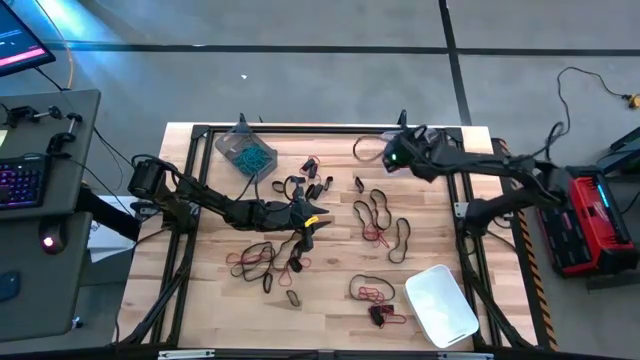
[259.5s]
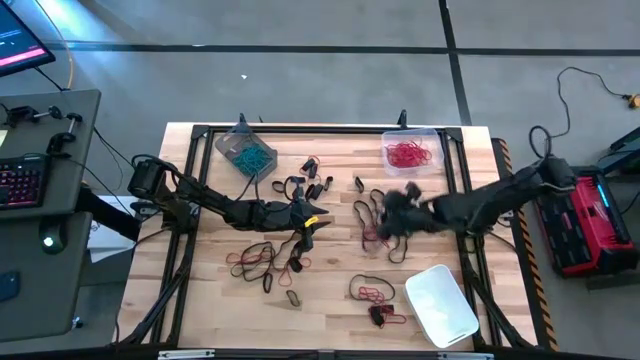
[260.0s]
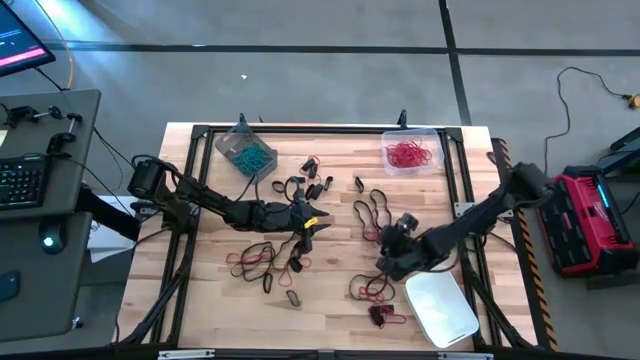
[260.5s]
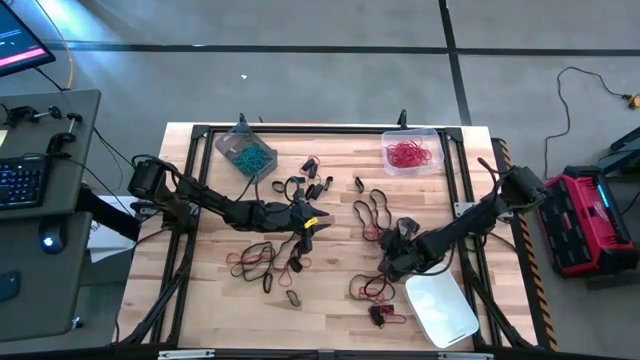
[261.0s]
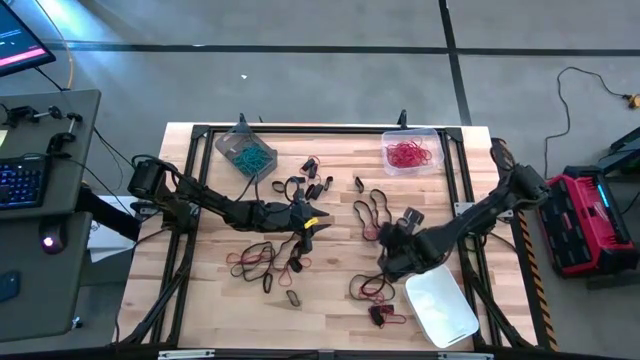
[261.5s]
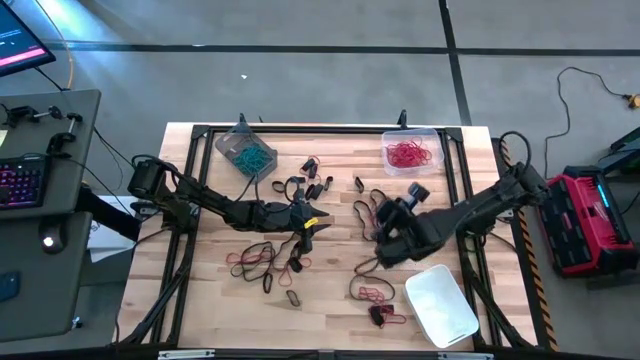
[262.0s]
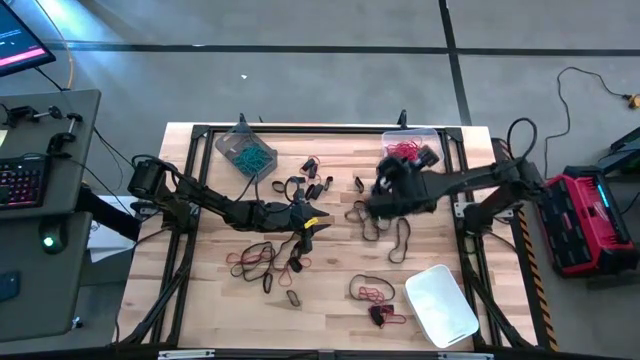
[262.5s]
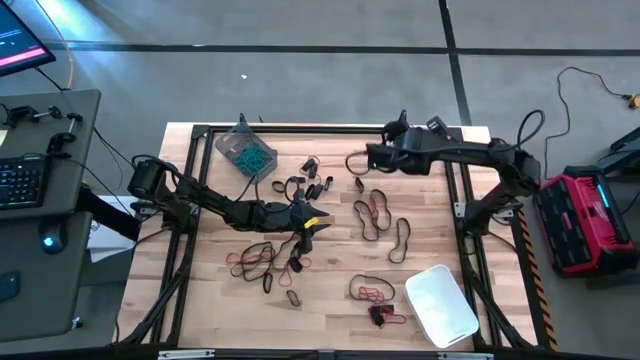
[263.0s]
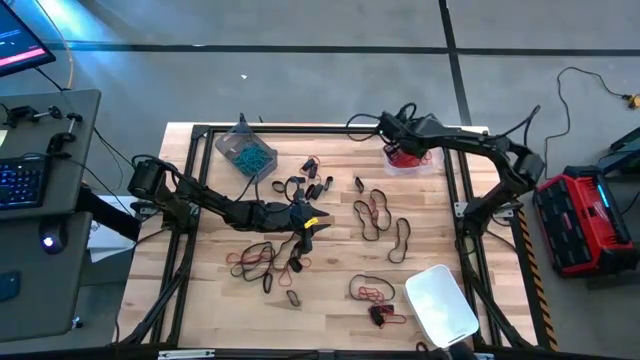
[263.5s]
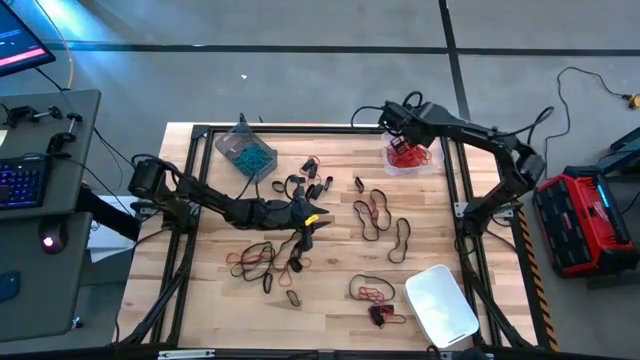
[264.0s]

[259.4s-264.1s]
Task: Sort rubber bands into baskets
Put the red rubber band into the transparent bin

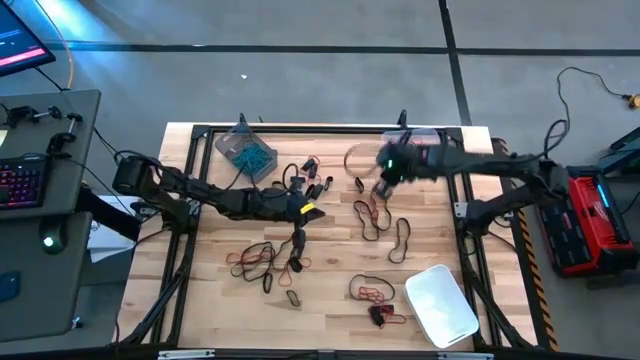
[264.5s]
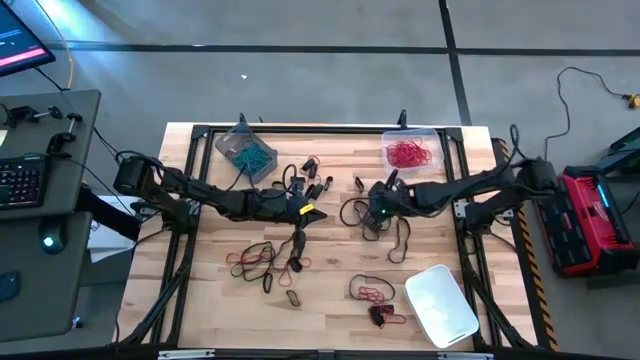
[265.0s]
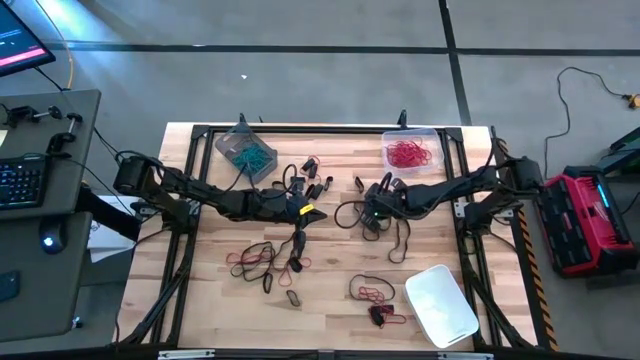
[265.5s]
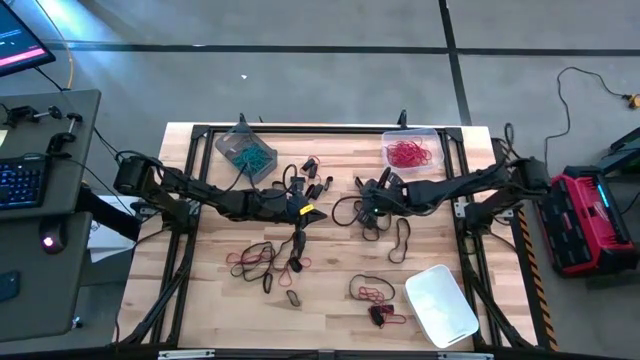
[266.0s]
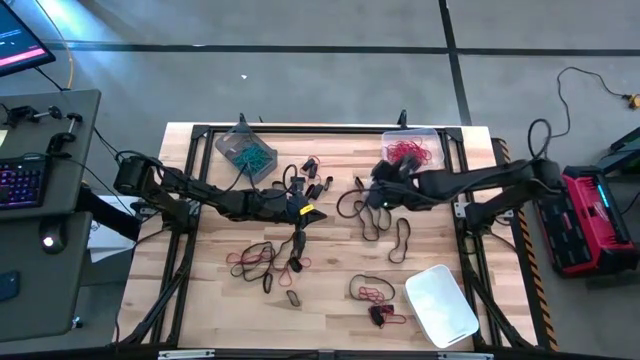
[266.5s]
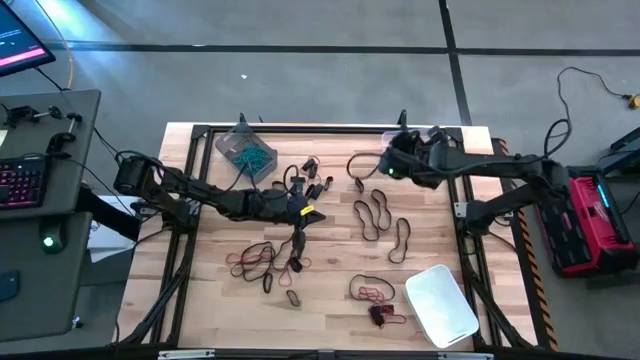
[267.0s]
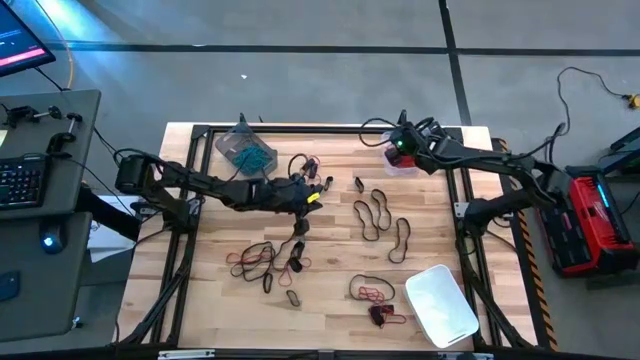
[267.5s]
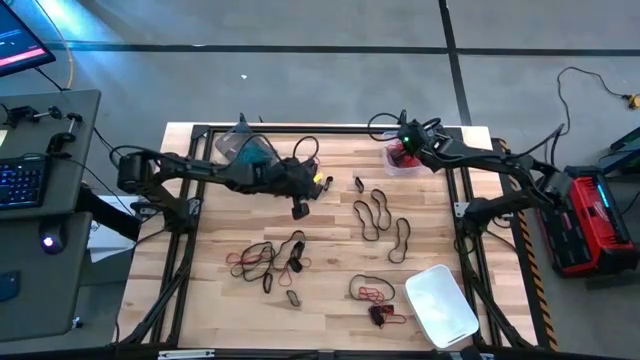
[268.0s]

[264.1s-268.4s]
Put the red rubber band into the transparent bin

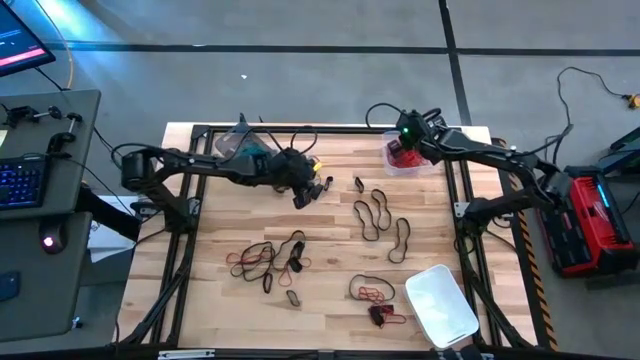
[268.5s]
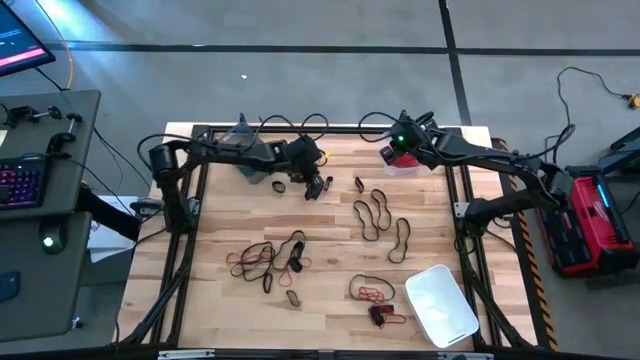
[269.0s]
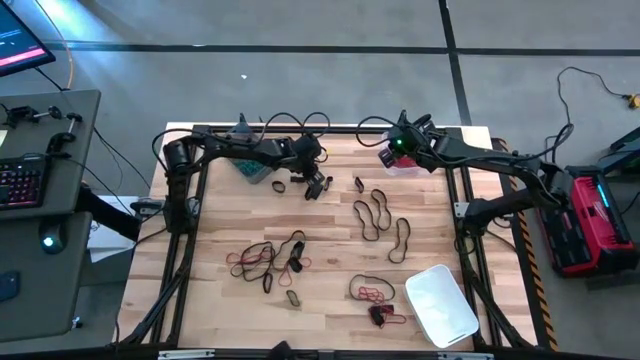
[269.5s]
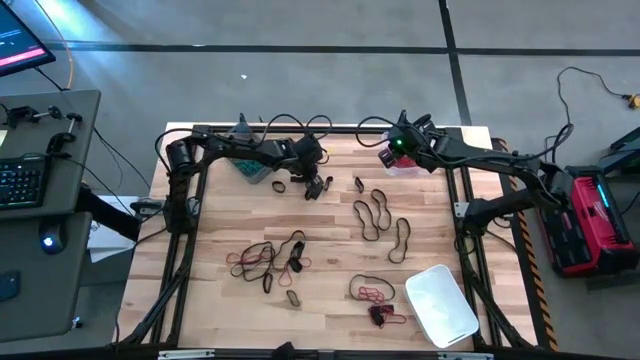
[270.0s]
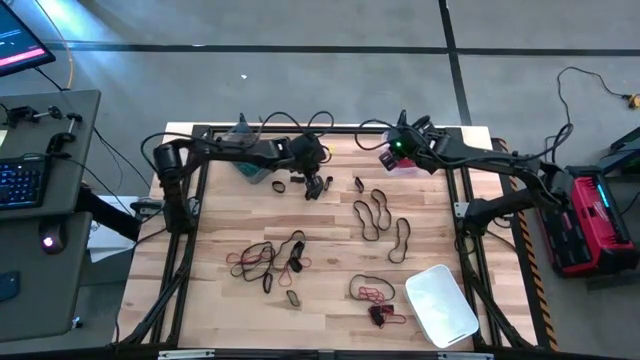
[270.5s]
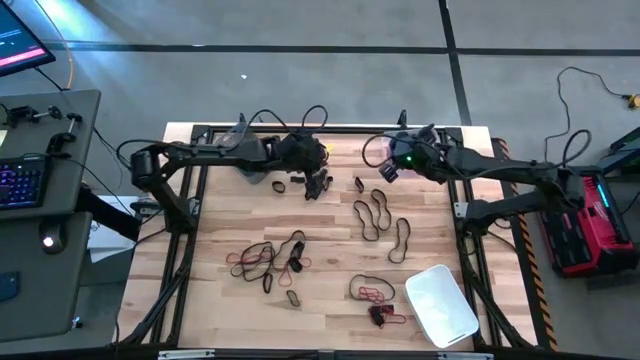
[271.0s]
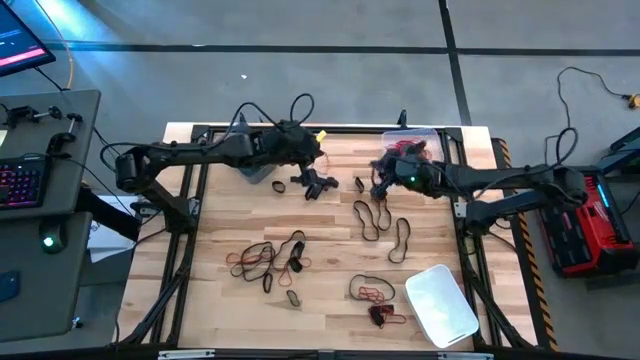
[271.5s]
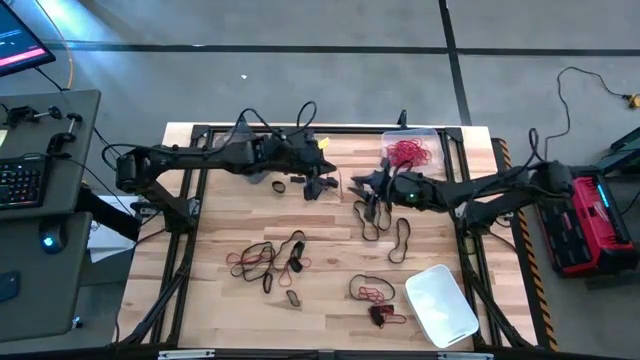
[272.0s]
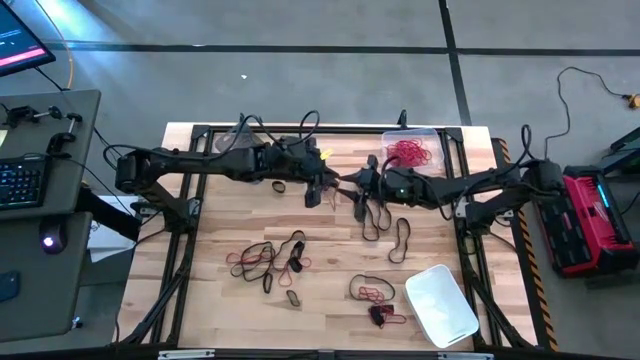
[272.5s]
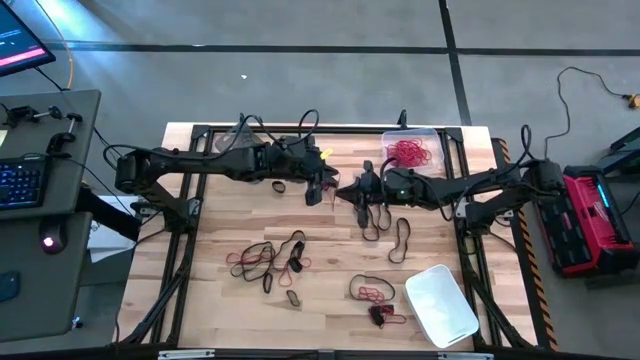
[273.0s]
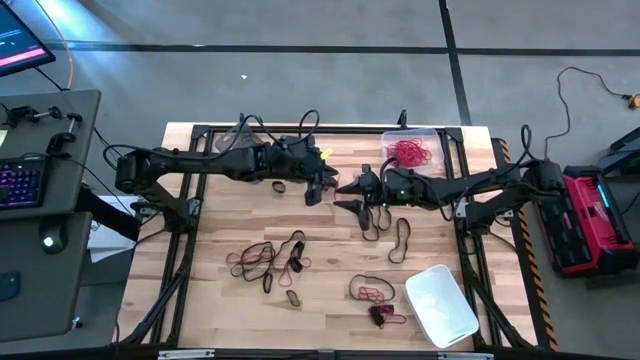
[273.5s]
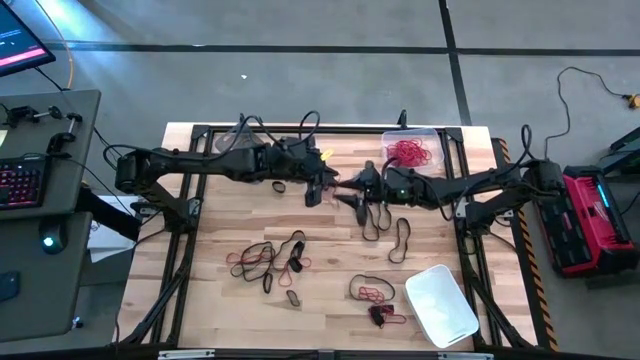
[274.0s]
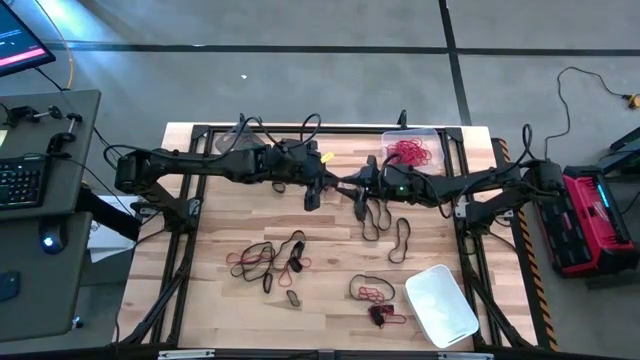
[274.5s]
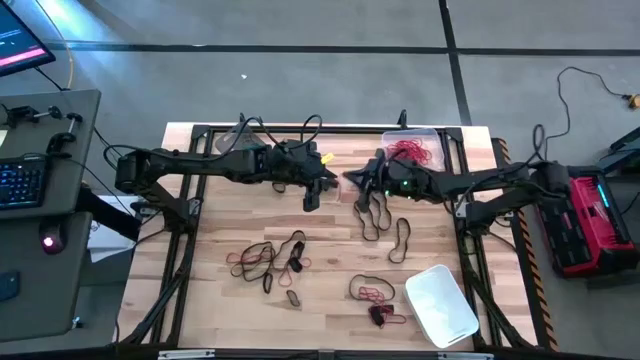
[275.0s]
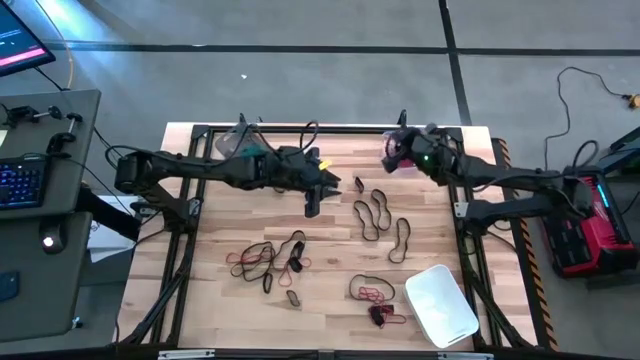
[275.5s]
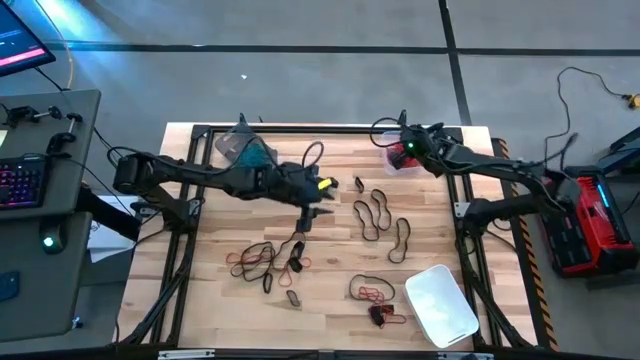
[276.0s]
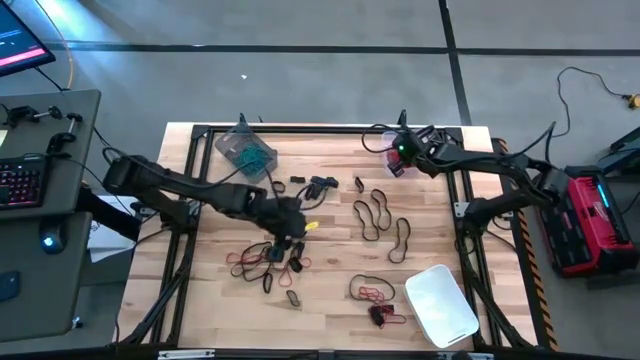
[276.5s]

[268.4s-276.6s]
Put the red rubber band into the transparent bin

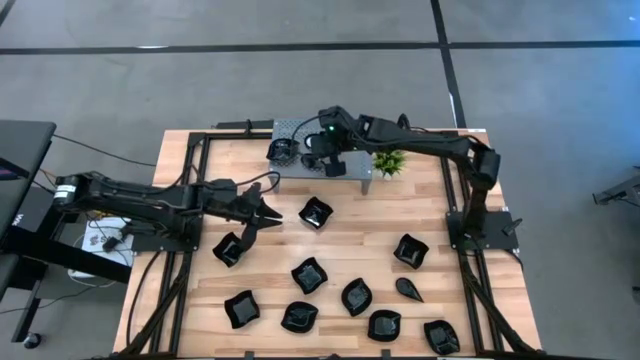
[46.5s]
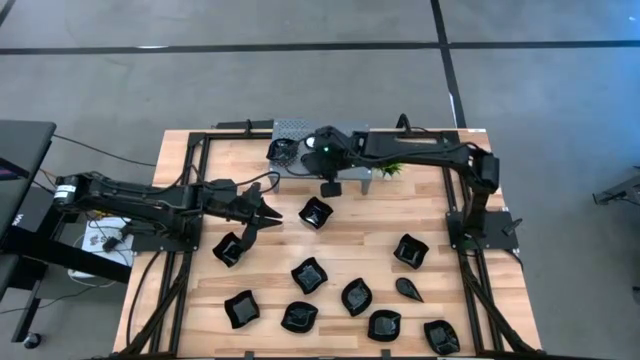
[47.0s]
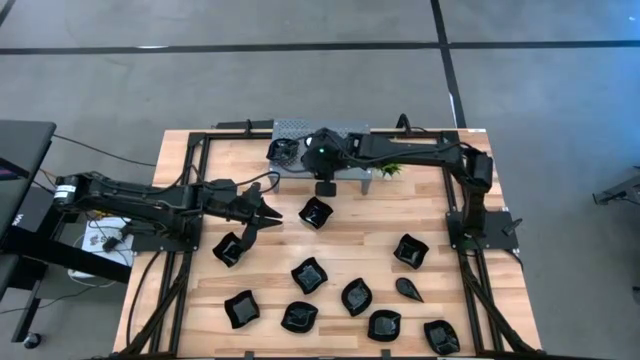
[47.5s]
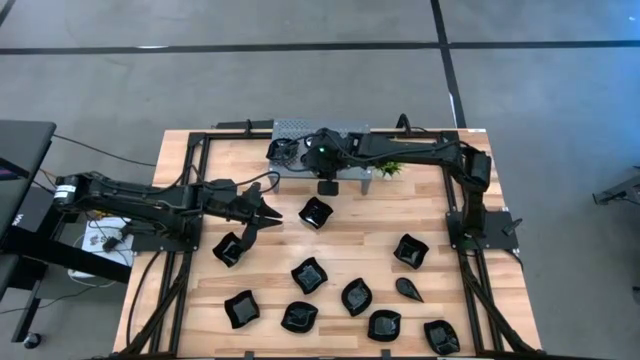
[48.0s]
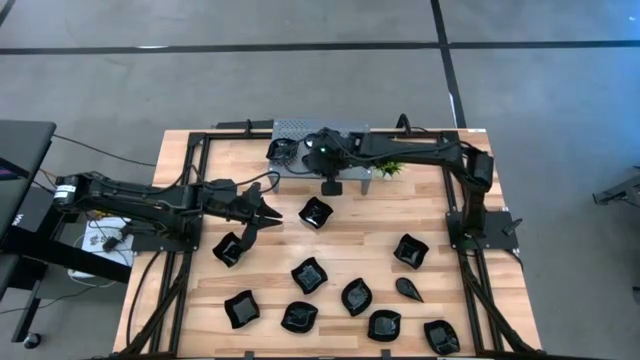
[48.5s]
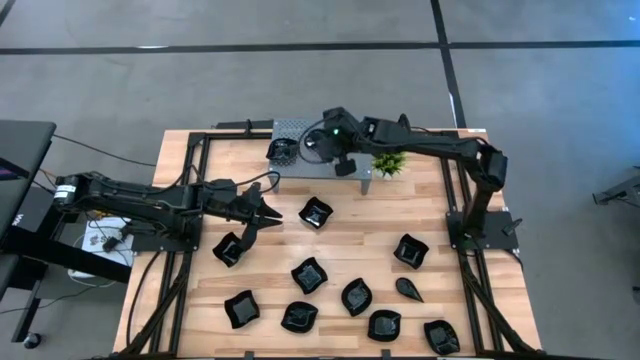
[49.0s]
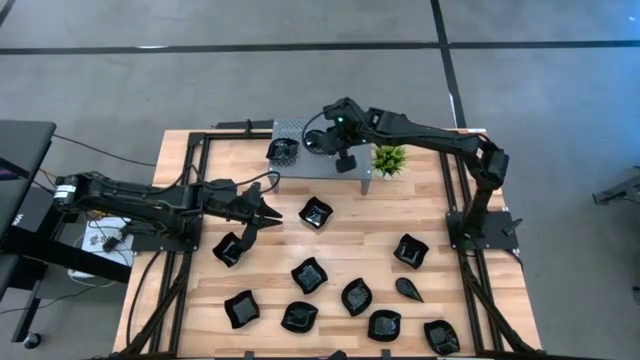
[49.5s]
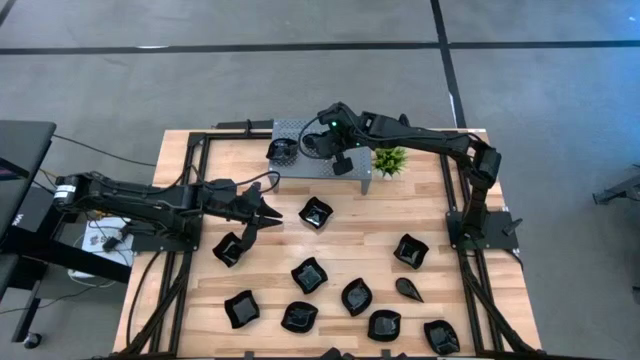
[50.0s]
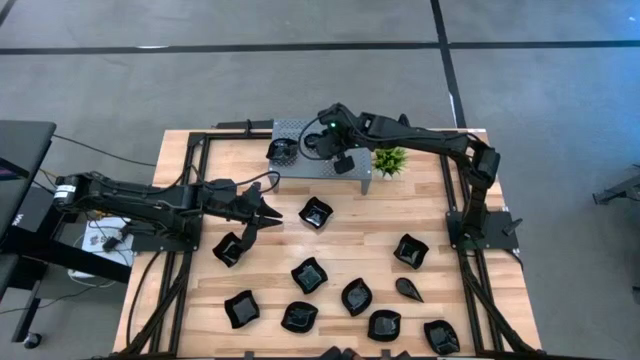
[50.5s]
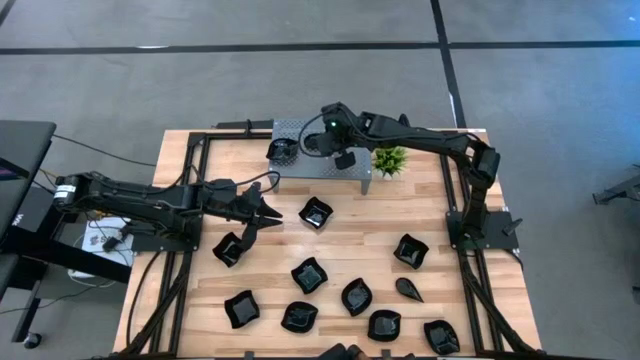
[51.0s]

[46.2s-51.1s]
Task: Pick & Place Mini shaped plates
Stack the drop-shaped plate on top of the drop-shaped plate on the shelf
